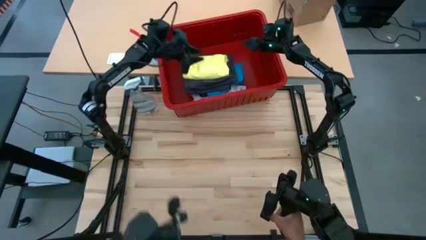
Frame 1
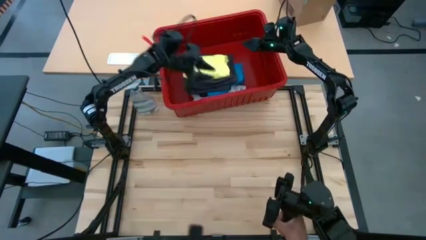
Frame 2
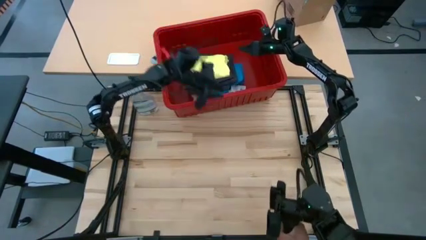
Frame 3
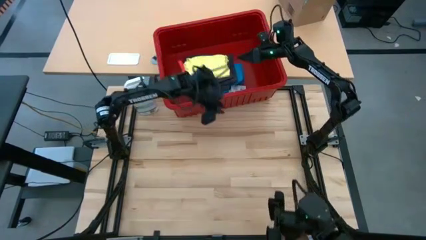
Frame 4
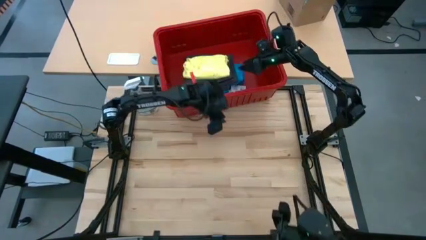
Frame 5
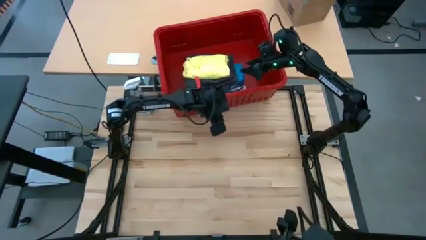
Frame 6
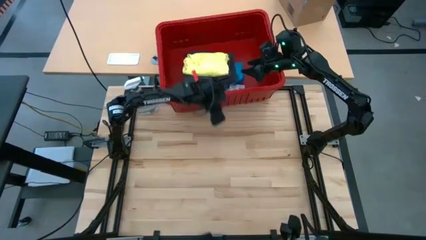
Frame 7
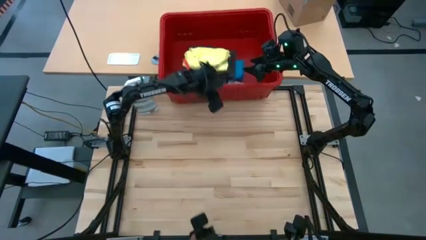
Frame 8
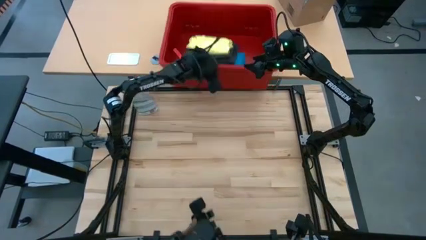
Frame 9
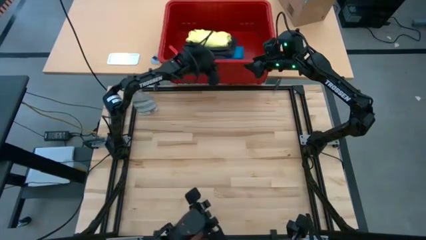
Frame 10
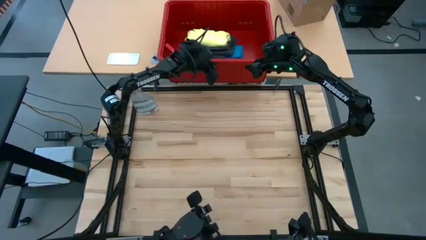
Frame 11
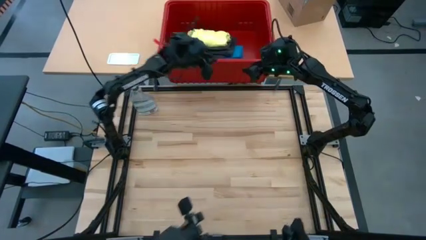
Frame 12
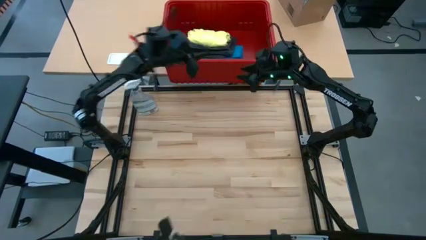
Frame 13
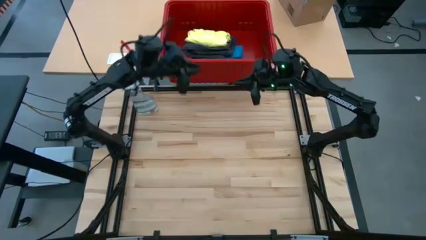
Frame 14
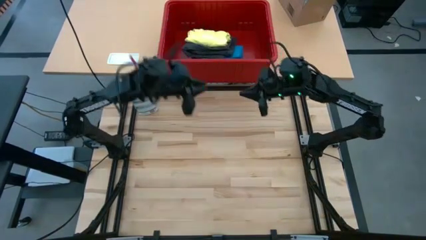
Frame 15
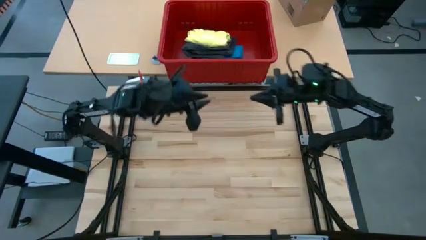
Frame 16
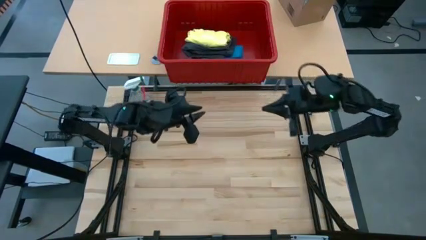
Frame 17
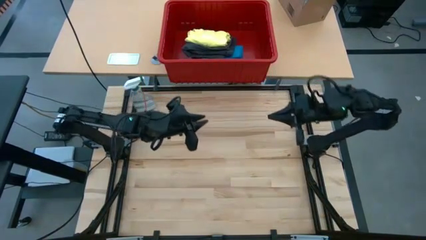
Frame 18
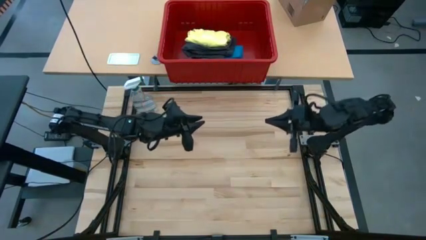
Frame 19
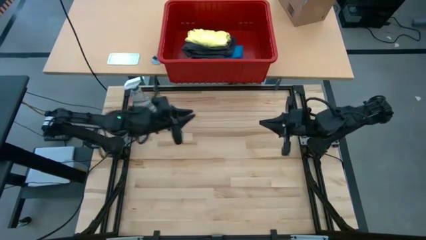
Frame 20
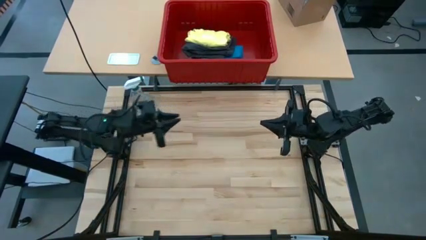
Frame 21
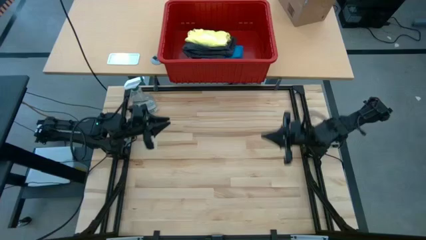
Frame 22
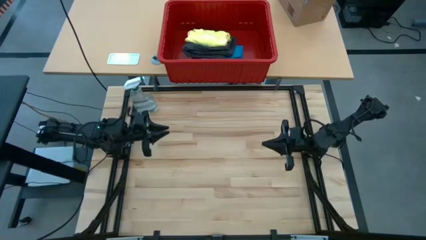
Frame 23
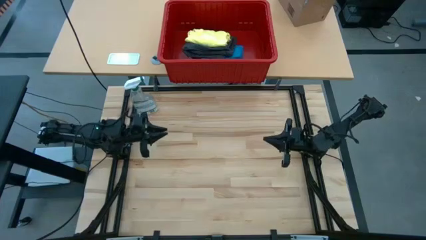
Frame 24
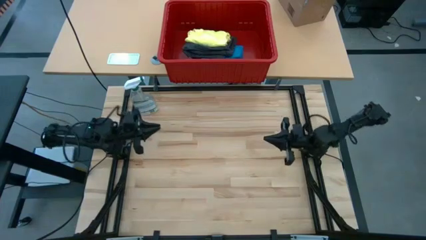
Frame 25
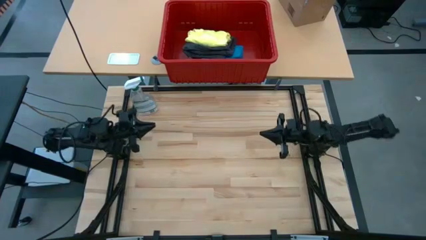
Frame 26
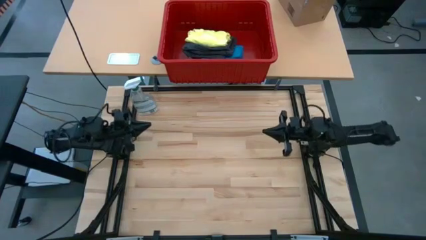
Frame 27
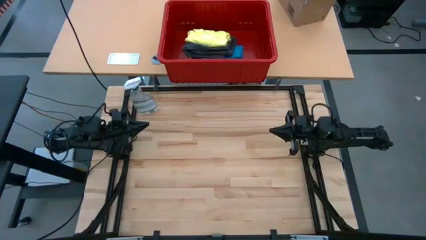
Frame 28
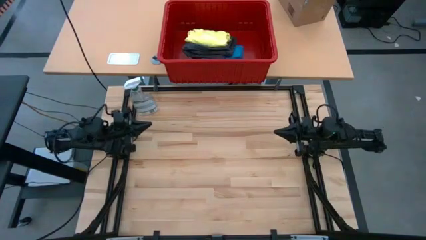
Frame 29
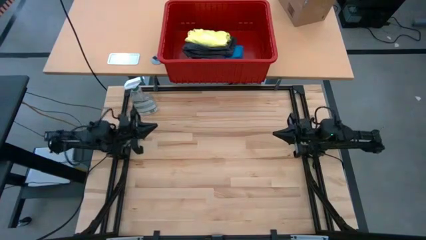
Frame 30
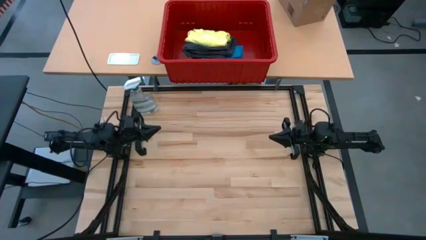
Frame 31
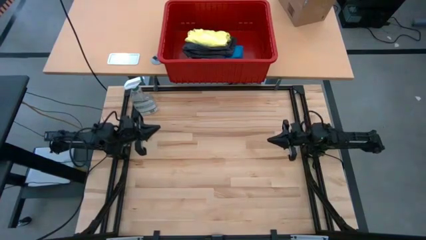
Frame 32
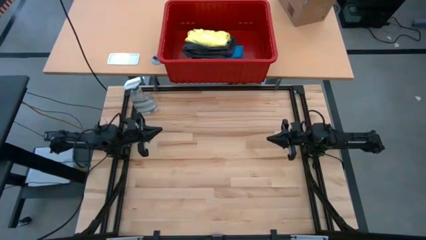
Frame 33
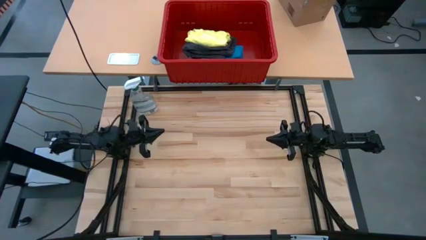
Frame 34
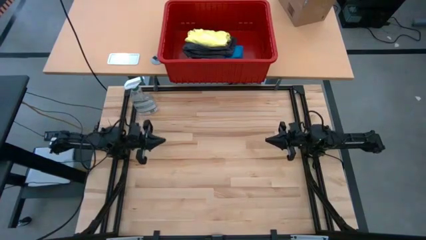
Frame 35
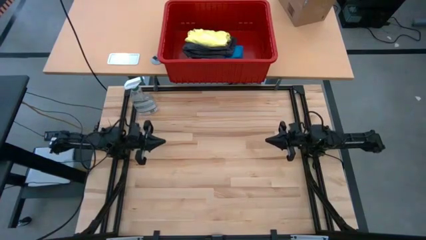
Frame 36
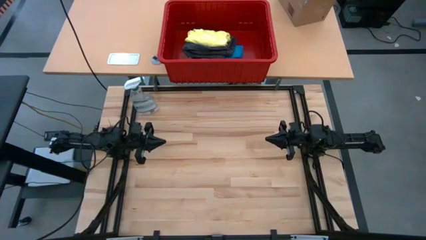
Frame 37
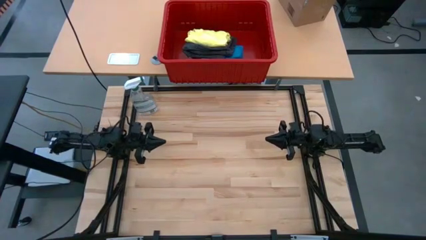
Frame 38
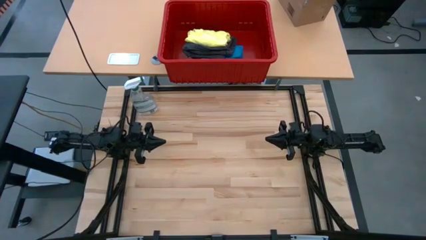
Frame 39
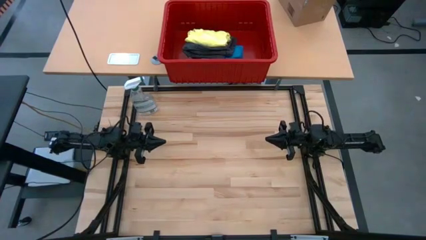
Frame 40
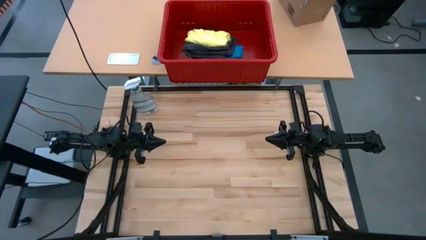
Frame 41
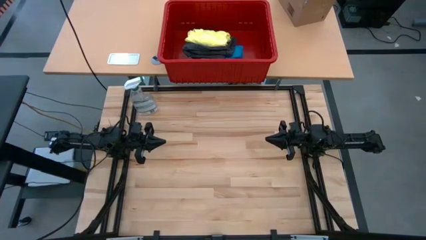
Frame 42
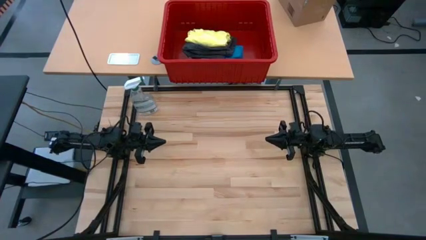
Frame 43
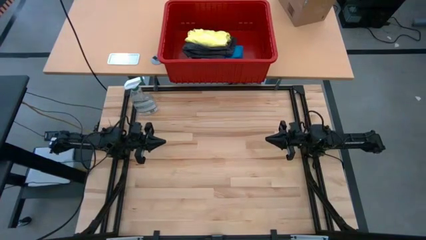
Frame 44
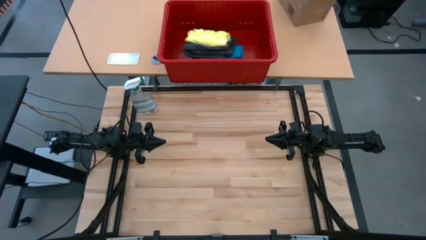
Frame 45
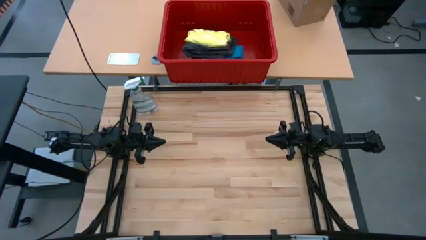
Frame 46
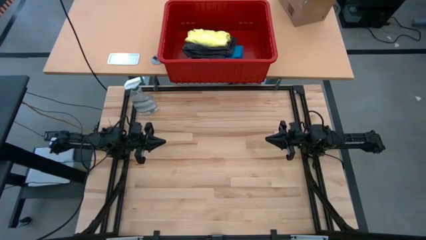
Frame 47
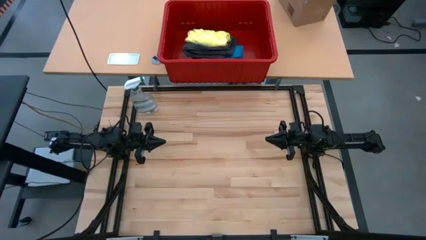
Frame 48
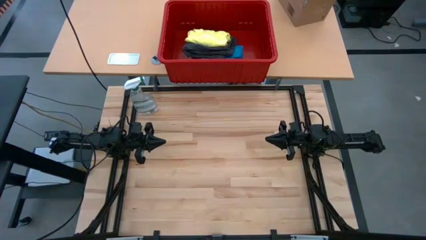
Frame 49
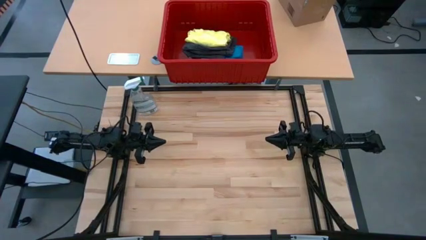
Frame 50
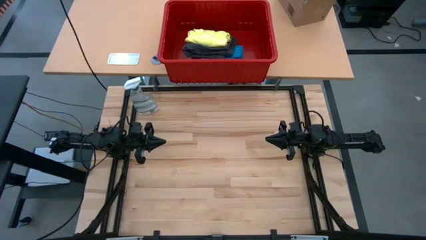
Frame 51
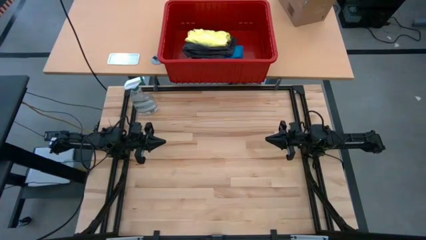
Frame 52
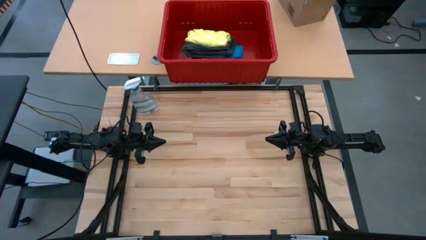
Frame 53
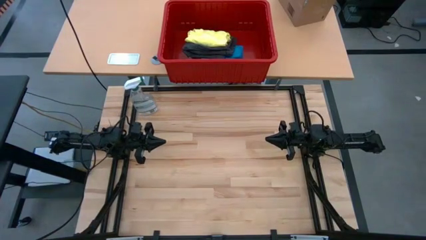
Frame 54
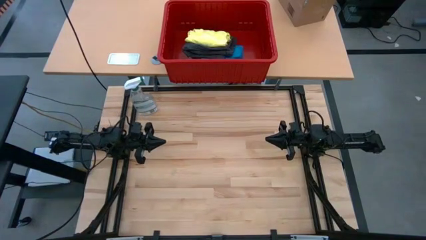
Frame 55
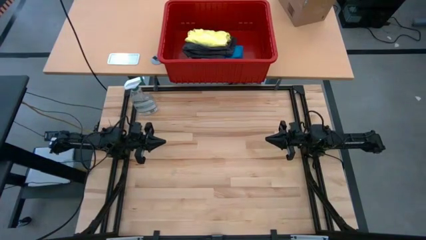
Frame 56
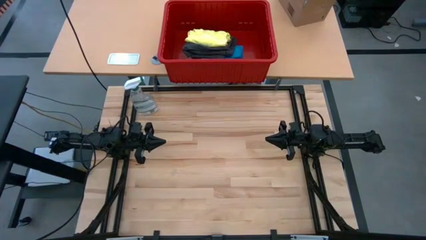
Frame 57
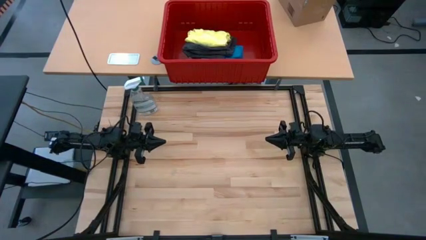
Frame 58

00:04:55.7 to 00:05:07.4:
Task: Fold Laundry from Bin
Return to Home Position

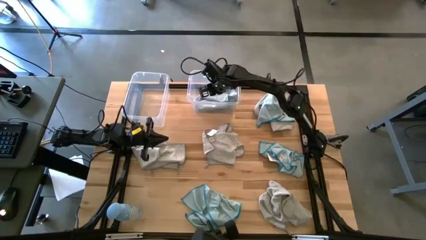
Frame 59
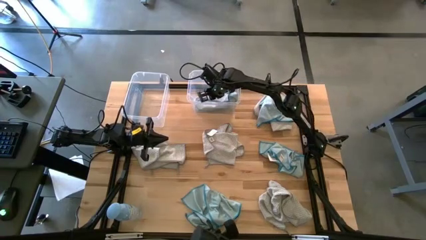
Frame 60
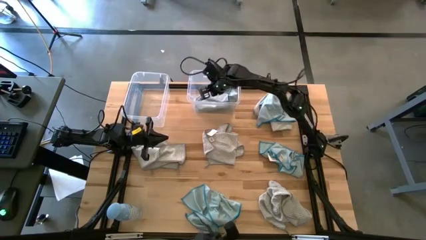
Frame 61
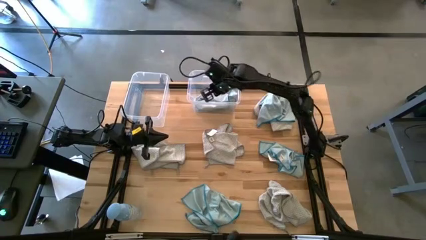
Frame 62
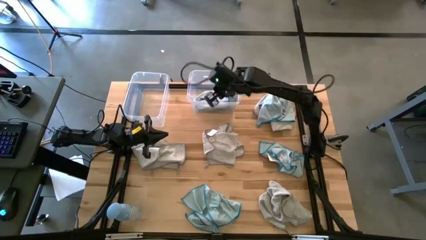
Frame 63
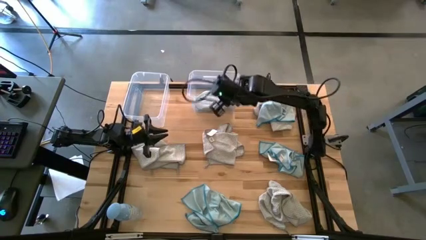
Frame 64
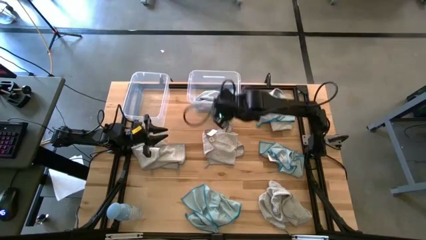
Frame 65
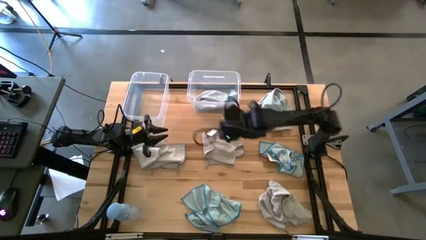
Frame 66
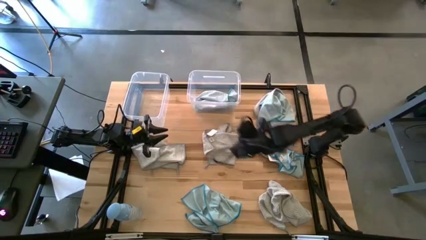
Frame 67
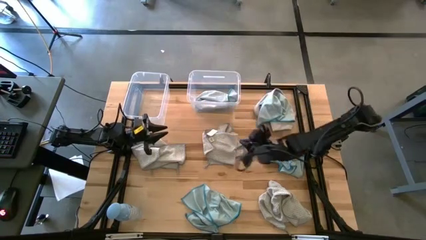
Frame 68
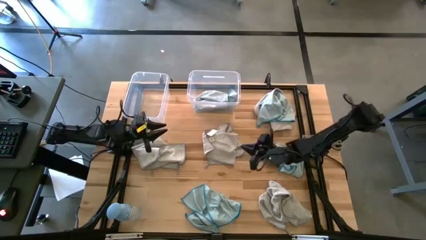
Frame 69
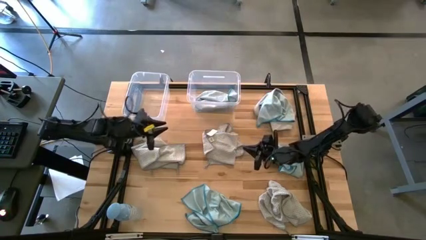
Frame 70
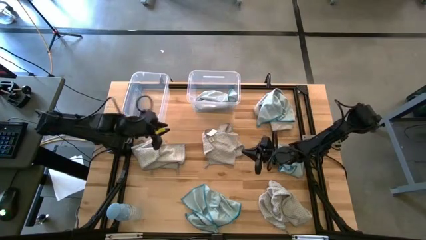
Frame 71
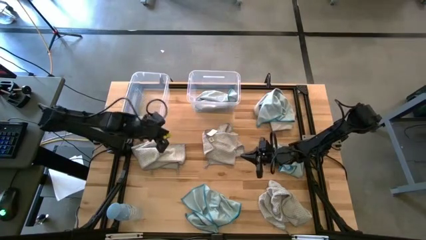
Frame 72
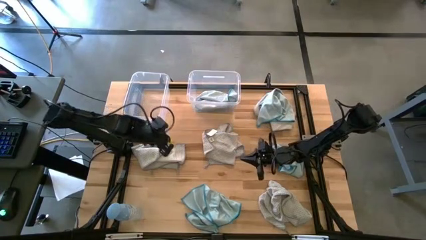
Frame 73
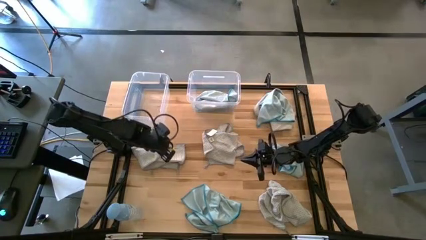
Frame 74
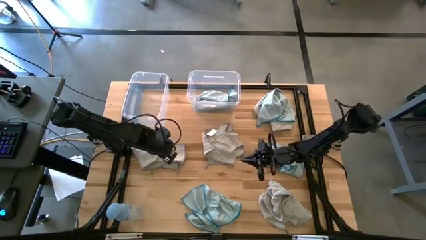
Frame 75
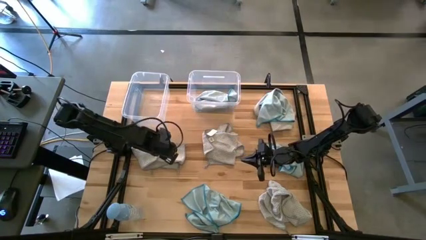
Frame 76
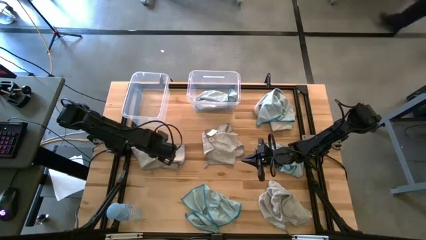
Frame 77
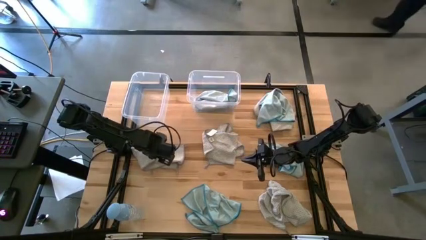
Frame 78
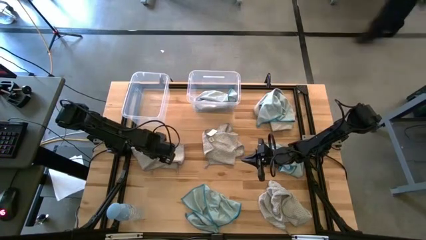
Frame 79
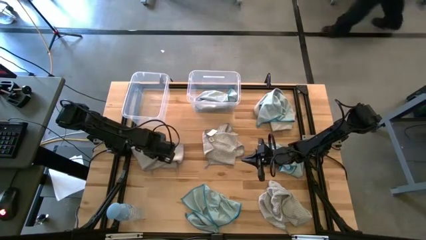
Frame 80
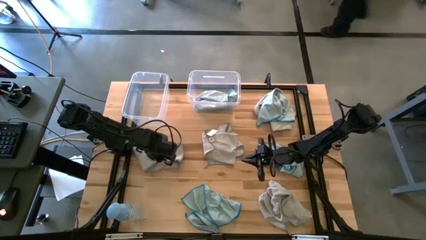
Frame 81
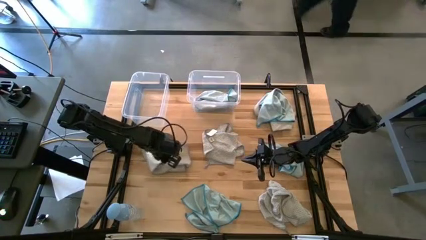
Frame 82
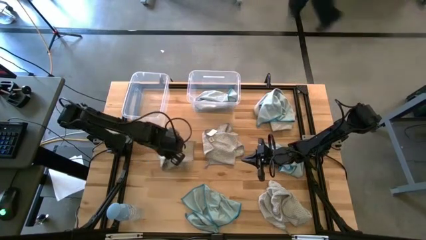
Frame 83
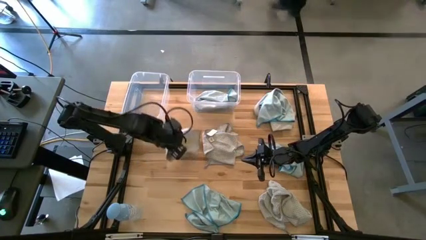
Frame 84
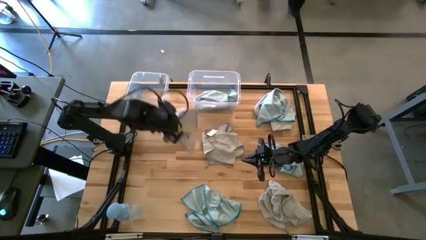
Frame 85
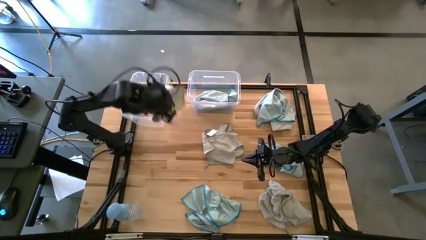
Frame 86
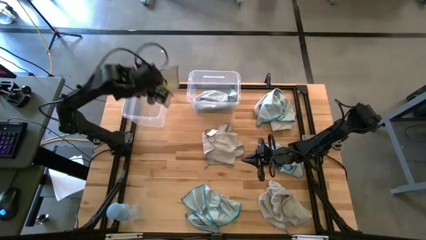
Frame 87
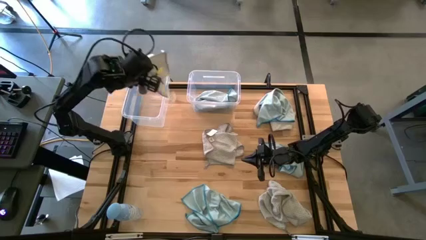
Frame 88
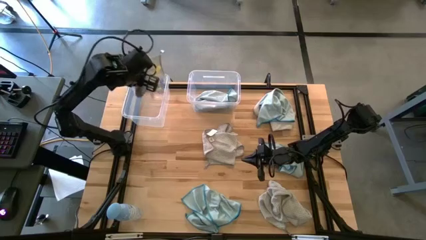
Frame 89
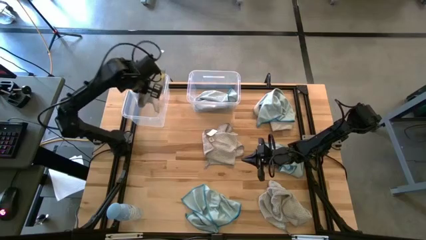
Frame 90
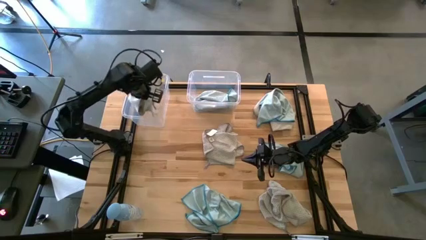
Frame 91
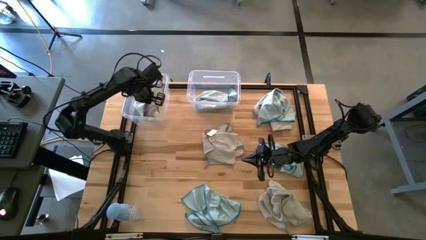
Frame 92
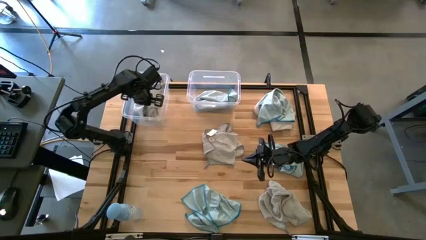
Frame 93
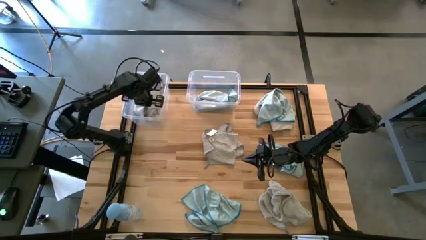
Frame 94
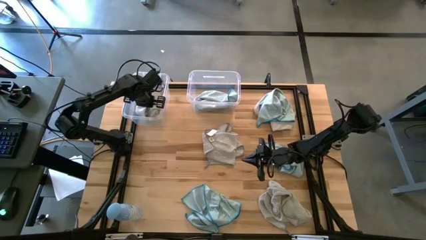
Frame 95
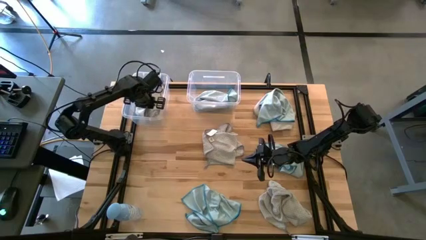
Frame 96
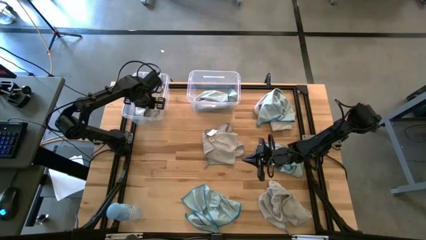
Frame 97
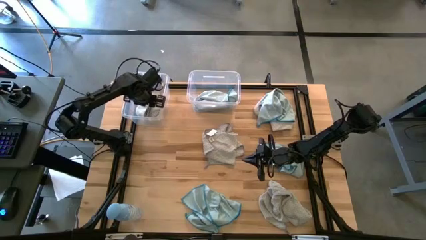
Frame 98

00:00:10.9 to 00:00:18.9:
Task: Sort microfiber towel by color & place in baskets
Put the center left brown microfiber cloth into the left transparent bin
